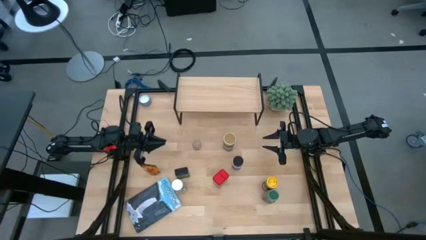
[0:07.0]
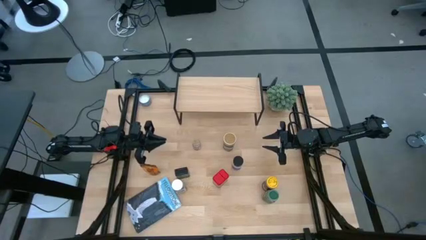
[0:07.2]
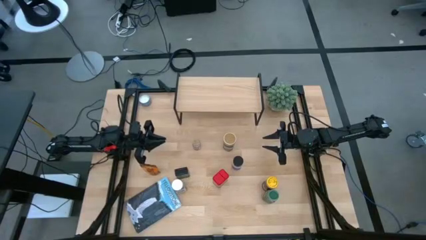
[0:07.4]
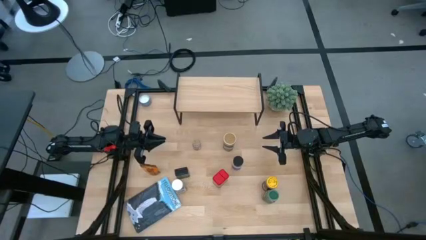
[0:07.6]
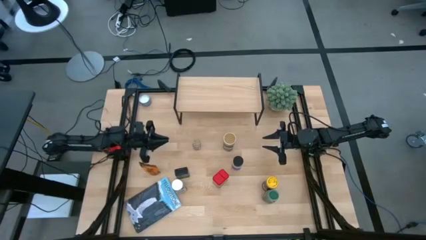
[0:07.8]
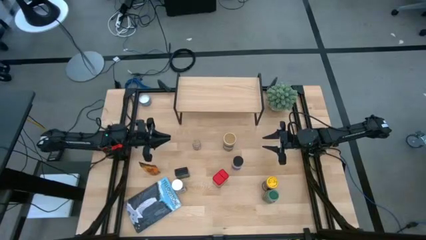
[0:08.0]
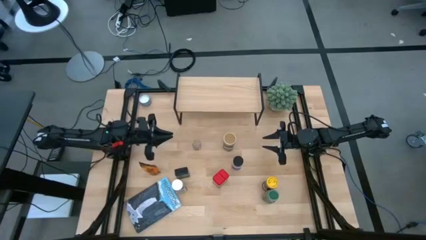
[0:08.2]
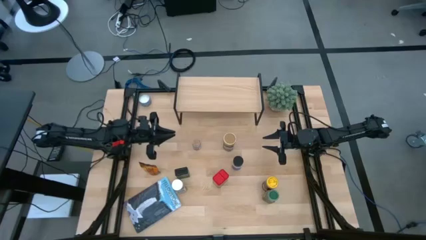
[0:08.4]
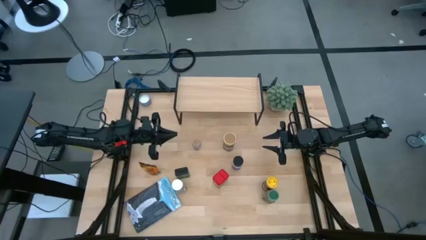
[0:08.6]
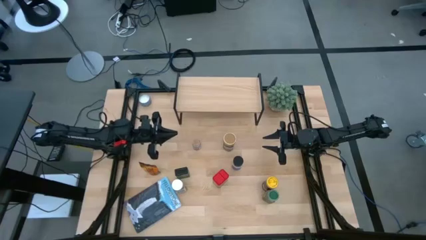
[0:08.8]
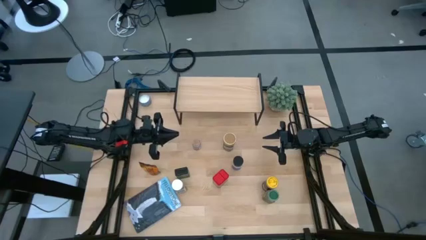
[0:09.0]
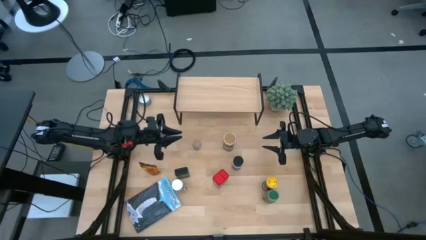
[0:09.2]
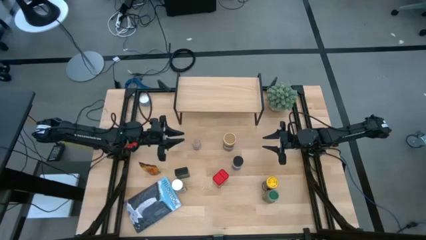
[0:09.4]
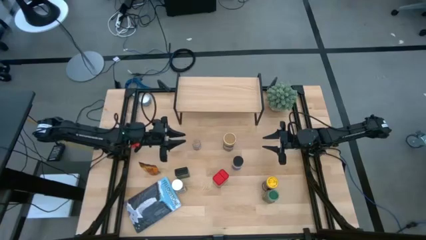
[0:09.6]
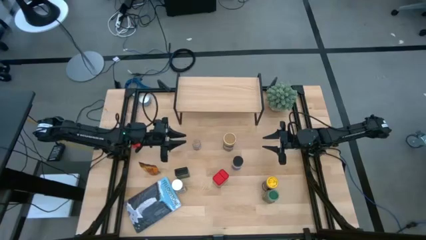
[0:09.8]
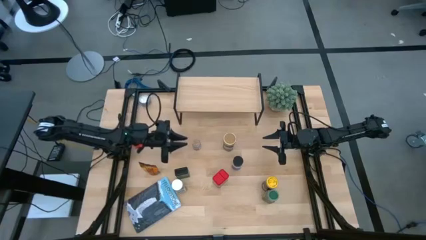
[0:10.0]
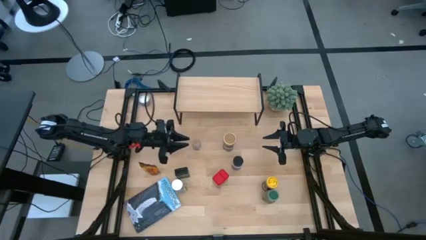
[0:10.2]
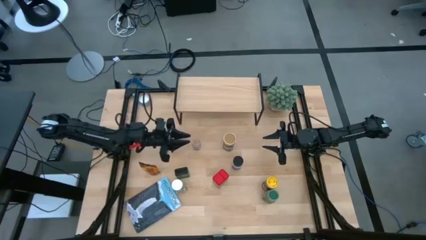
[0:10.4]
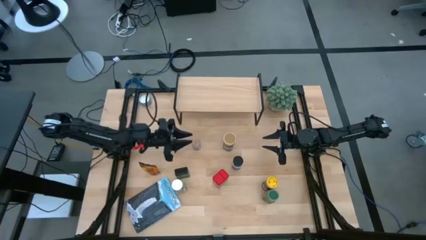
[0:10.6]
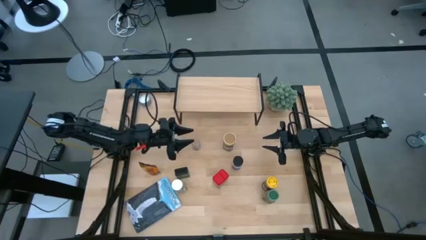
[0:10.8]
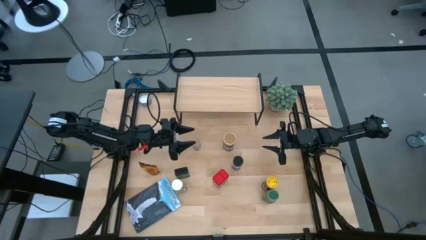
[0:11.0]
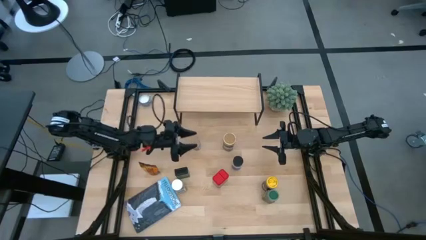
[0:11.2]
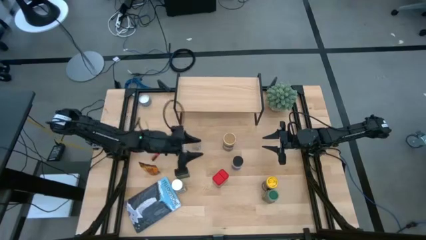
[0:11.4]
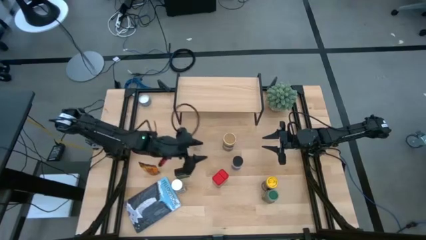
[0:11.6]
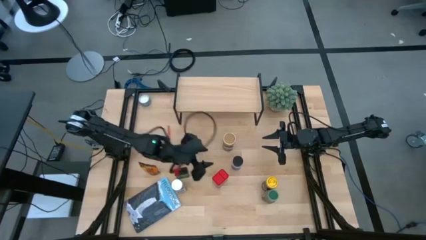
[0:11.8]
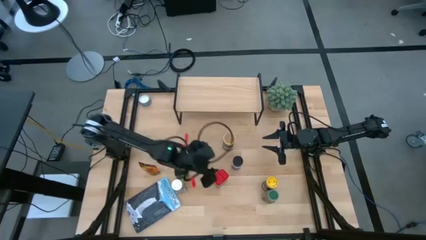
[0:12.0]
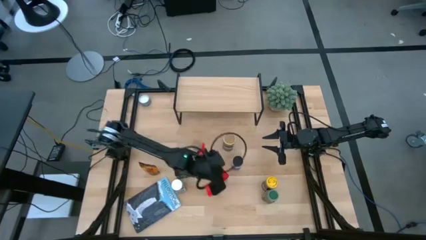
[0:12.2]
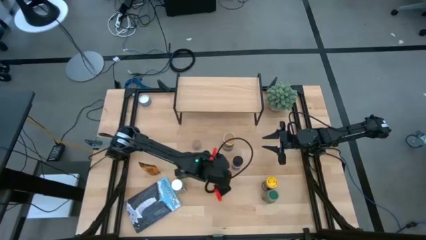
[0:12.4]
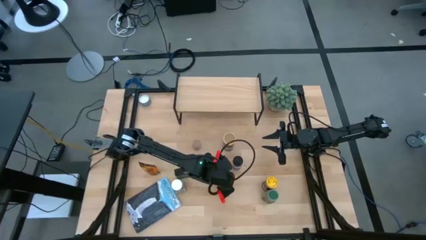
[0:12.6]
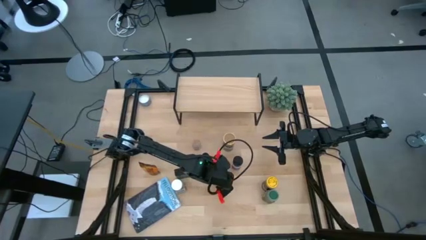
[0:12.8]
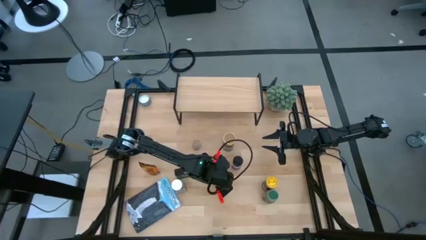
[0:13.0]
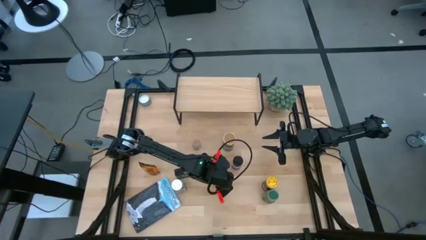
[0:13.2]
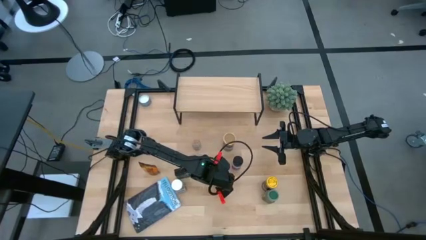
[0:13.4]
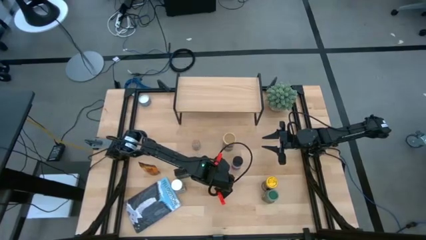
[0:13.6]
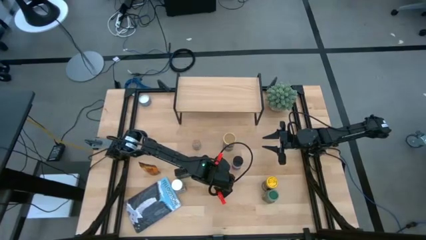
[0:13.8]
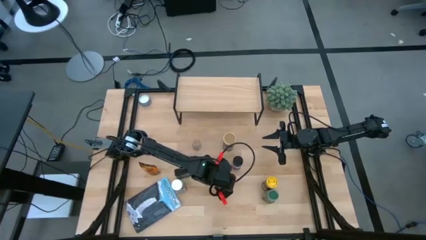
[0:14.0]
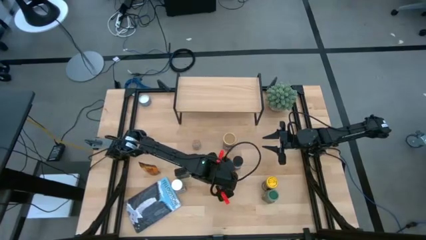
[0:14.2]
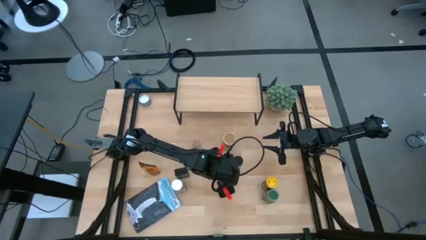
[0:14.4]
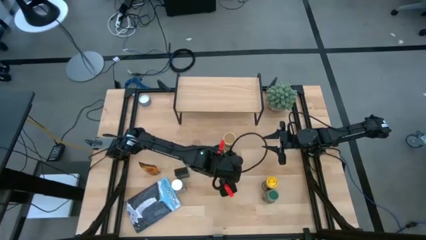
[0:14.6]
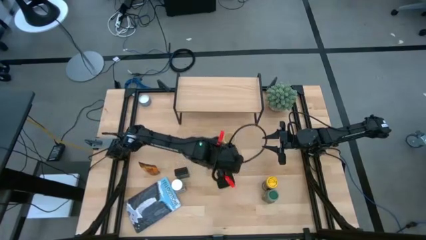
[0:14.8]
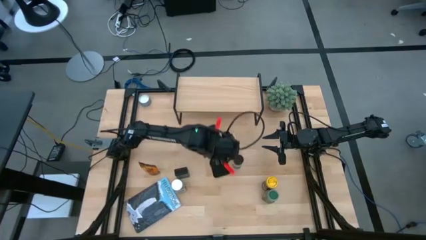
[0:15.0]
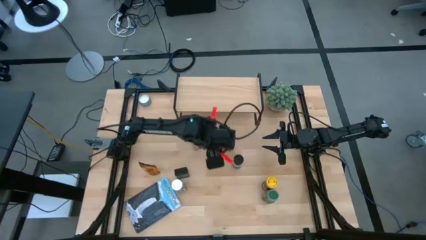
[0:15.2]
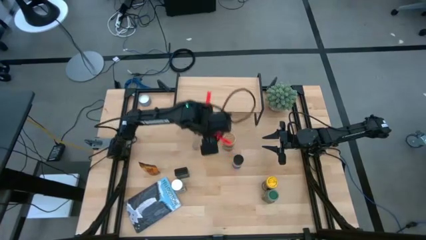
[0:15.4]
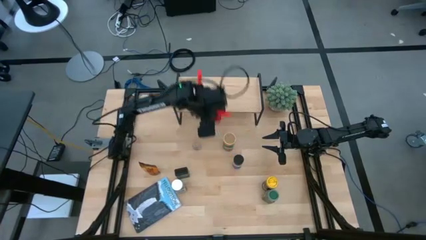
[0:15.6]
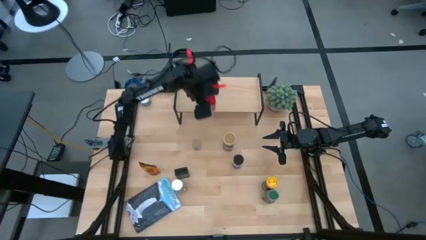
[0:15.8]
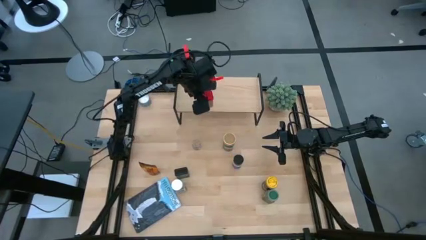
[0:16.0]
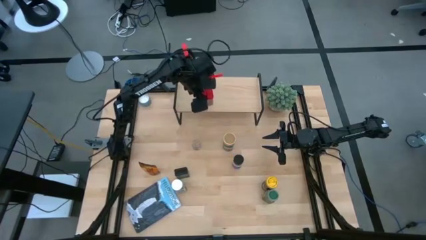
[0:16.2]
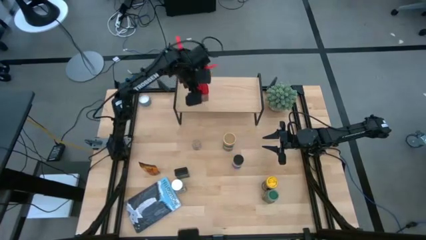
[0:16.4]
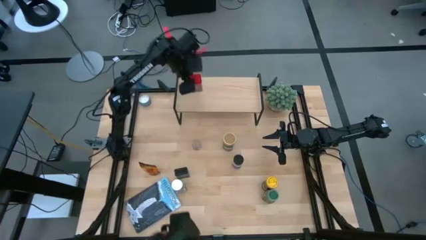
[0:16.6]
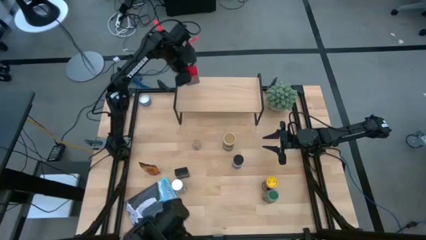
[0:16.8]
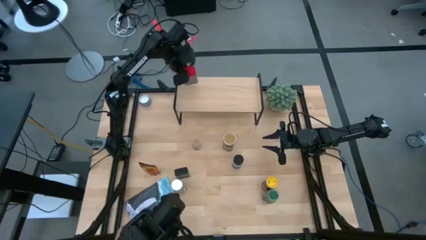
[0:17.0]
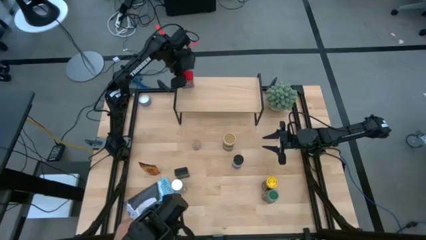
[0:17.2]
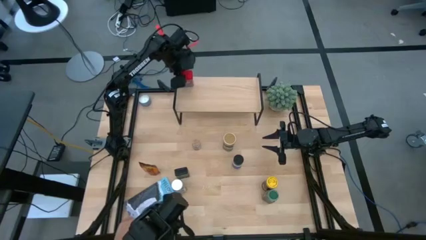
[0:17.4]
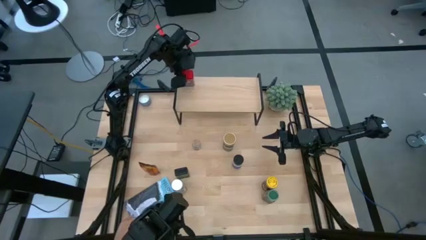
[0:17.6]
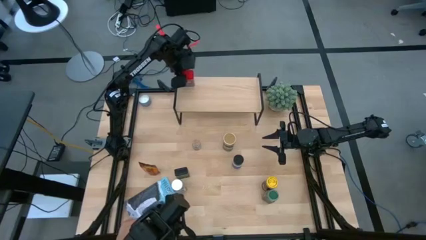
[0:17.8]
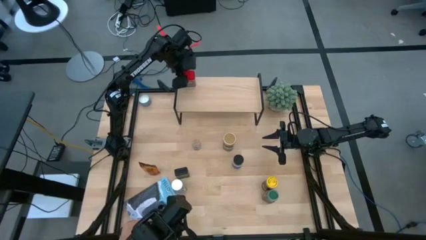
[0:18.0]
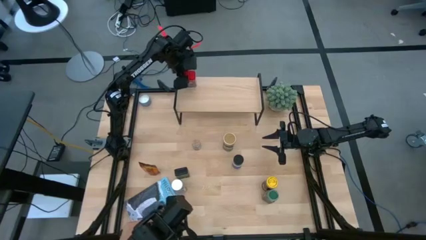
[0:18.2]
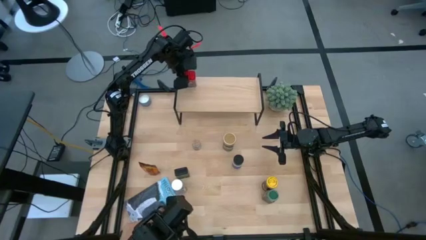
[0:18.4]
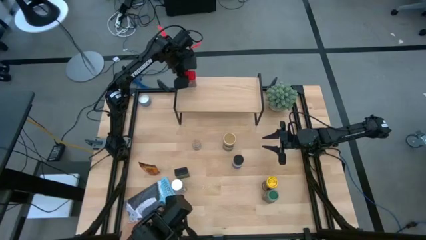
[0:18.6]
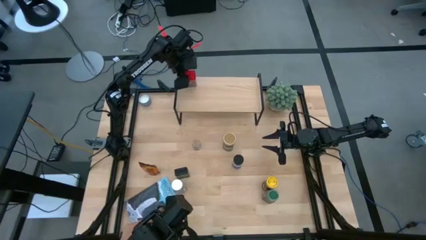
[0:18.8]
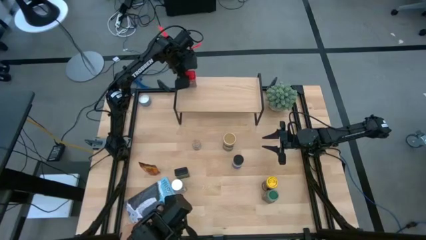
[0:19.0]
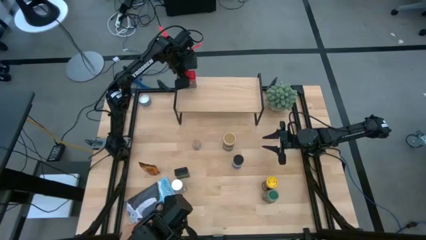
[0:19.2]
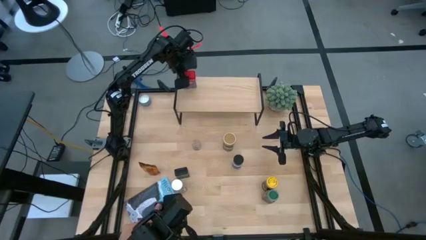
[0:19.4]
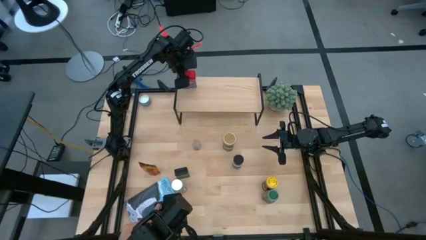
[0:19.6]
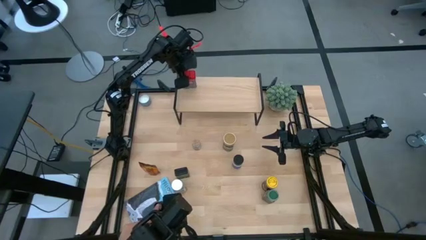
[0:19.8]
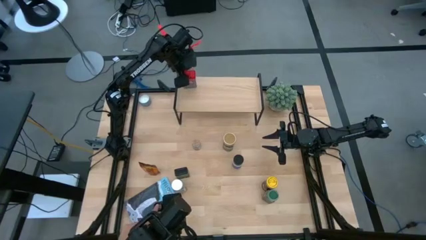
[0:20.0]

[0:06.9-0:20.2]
Task: Shelf spices
Put the red seasoning bottle on the shelf
